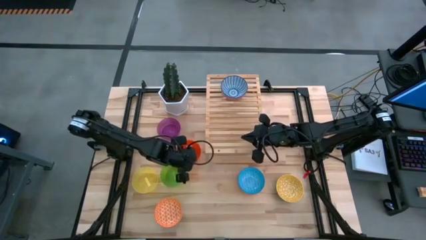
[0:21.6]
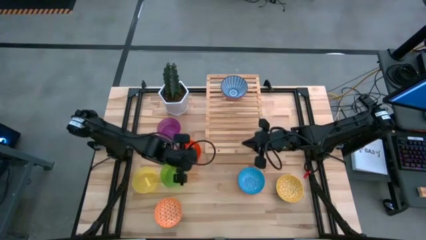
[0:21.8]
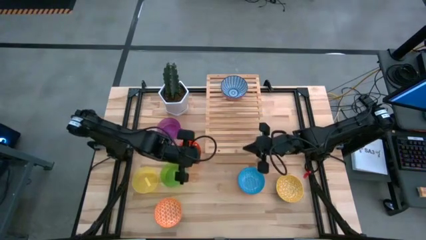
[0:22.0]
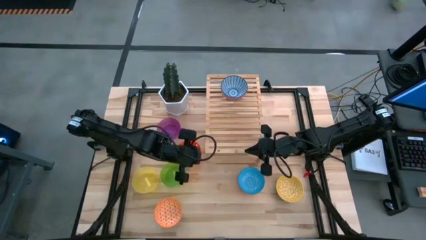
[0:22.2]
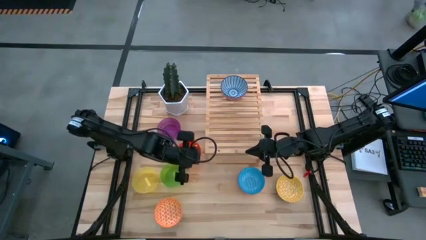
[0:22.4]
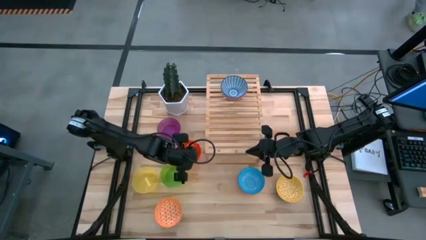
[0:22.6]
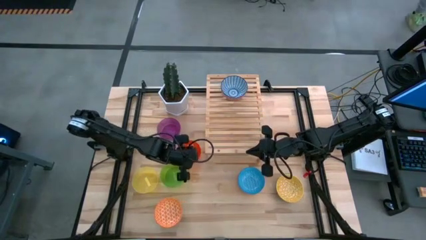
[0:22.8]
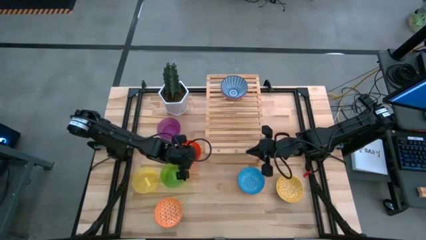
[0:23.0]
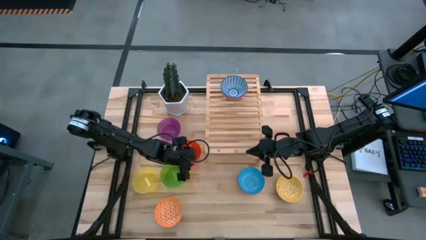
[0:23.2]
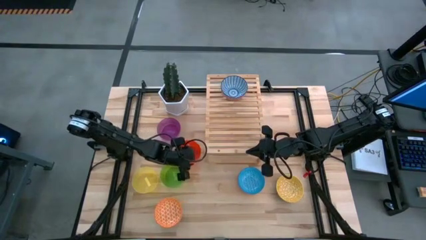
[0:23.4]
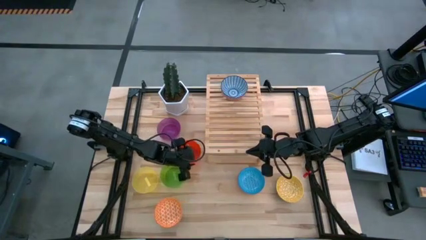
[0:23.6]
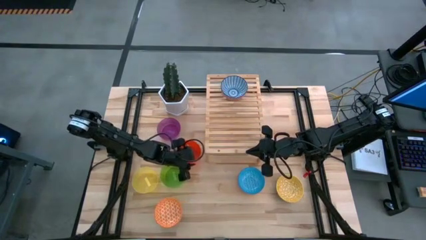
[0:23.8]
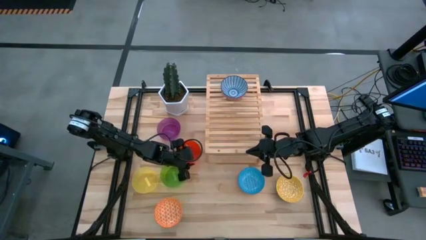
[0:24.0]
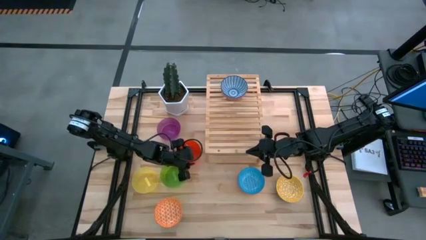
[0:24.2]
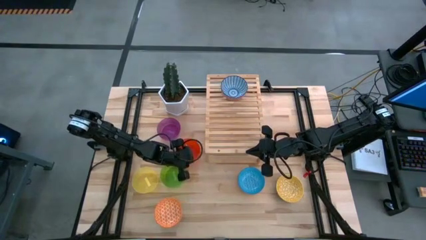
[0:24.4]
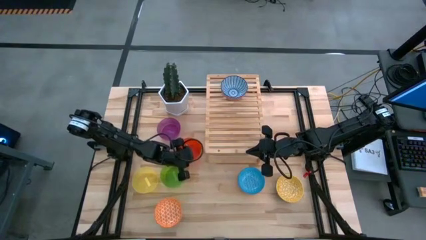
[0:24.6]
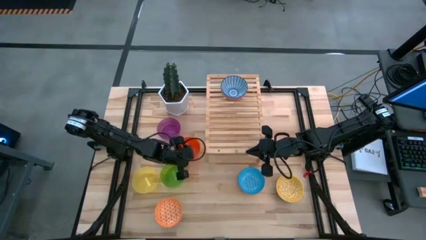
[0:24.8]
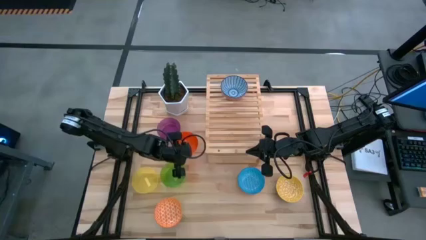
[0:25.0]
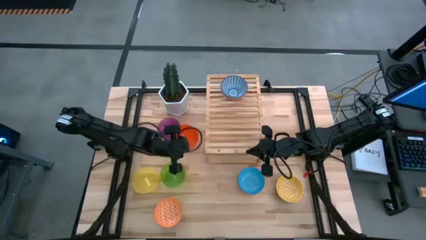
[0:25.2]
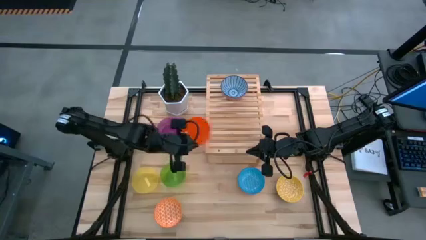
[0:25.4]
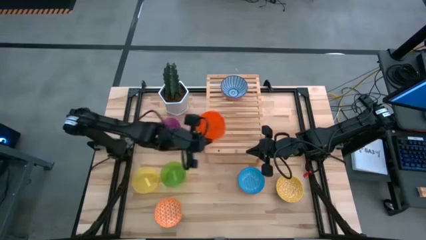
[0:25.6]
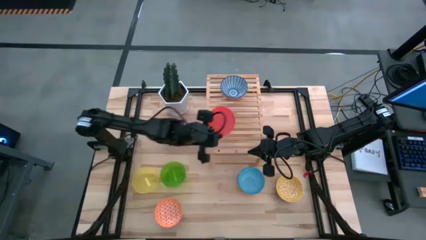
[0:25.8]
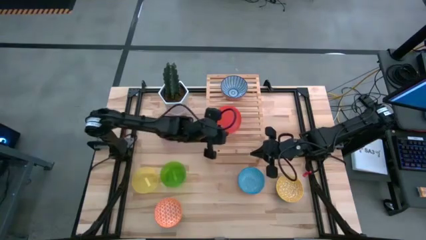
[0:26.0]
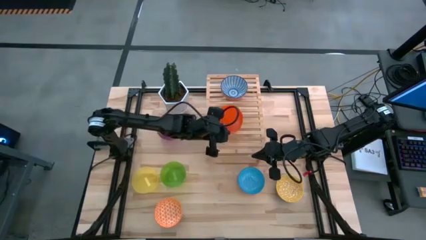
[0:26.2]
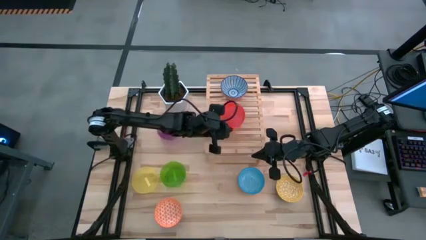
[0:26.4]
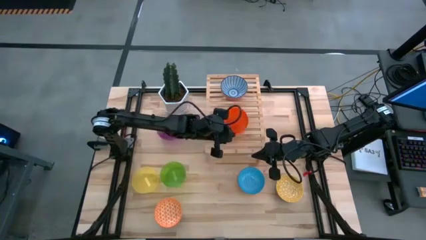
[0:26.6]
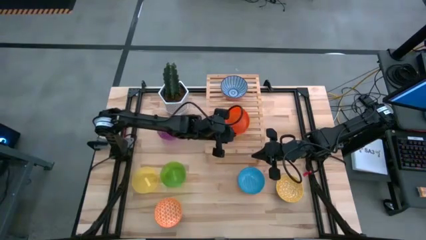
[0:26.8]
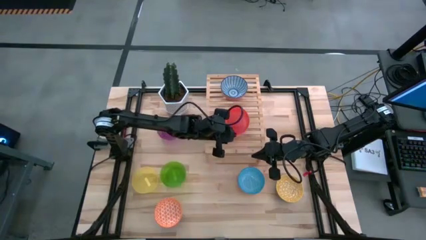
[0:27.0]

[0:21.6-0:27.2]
Task: Place and stack bowls onto a shelf
Put the orange bowl on the shelf

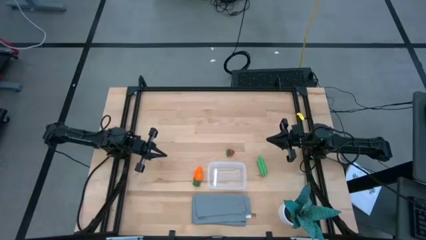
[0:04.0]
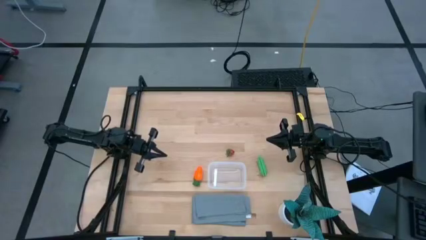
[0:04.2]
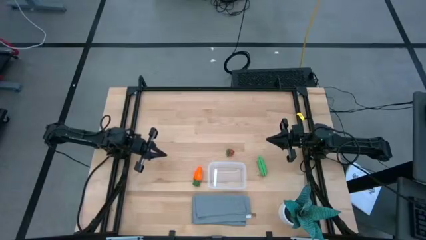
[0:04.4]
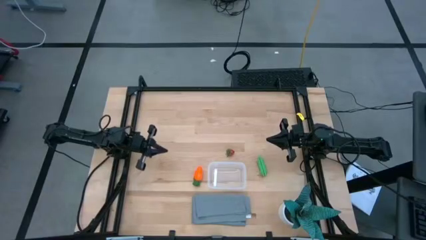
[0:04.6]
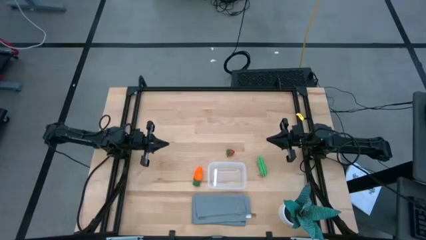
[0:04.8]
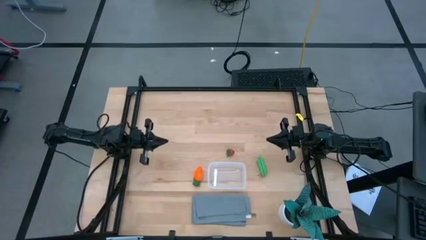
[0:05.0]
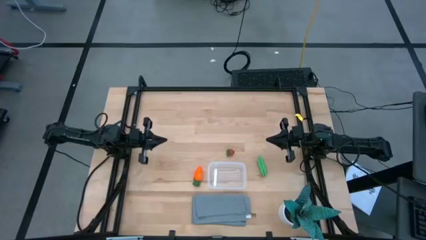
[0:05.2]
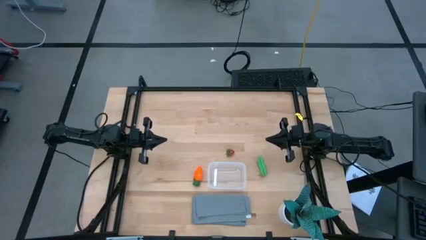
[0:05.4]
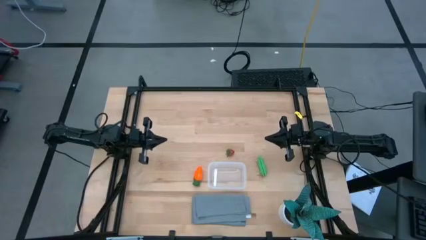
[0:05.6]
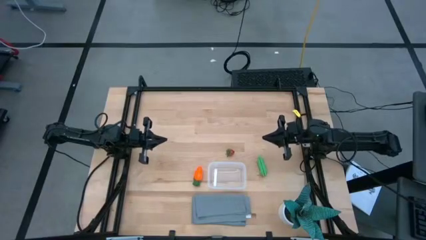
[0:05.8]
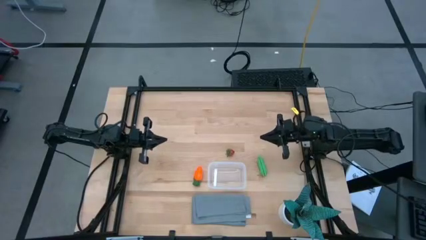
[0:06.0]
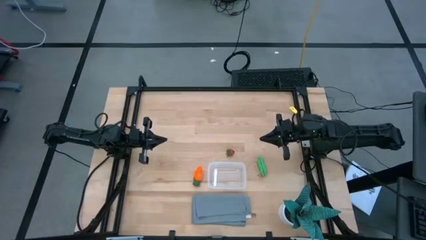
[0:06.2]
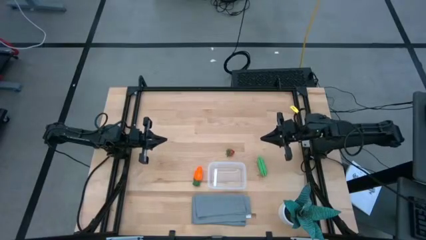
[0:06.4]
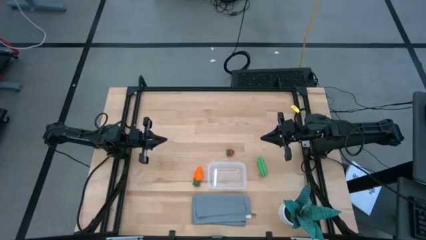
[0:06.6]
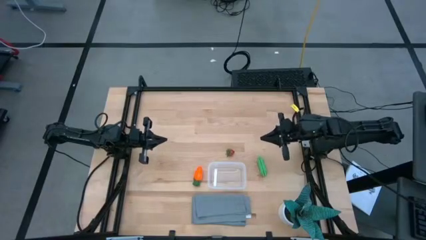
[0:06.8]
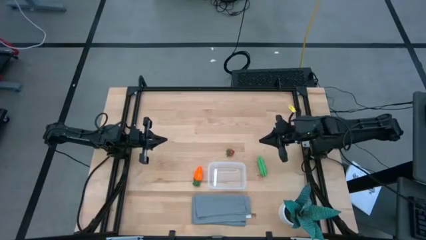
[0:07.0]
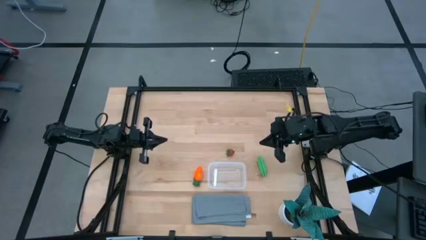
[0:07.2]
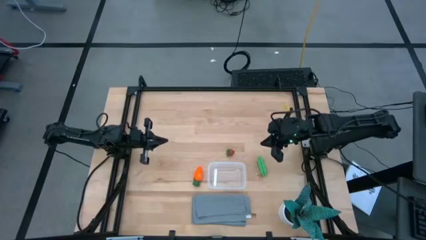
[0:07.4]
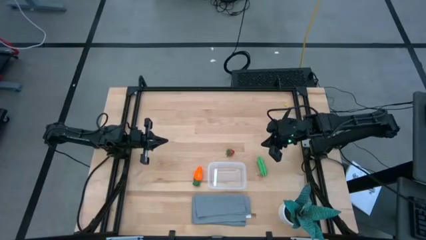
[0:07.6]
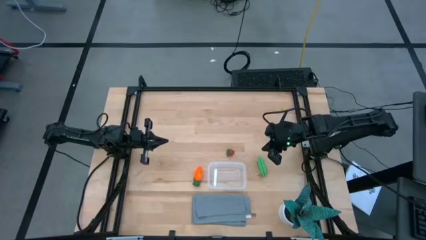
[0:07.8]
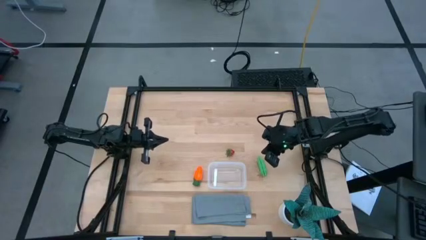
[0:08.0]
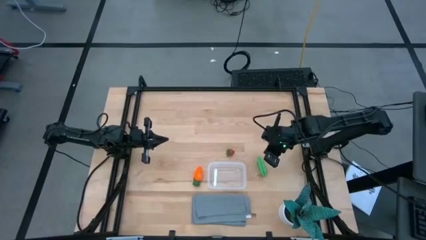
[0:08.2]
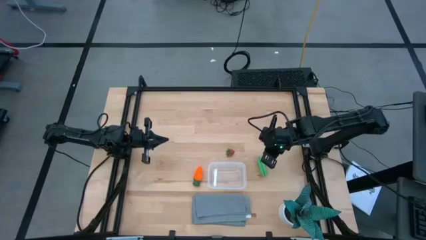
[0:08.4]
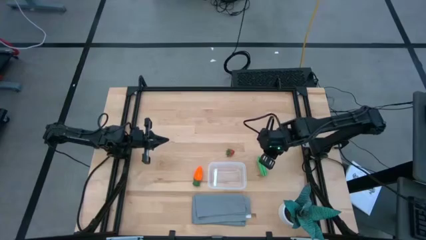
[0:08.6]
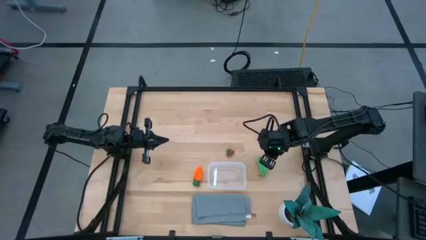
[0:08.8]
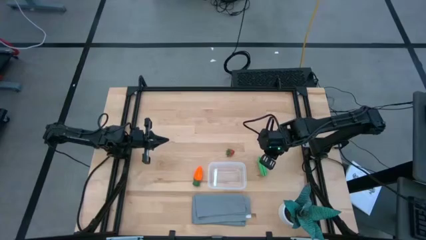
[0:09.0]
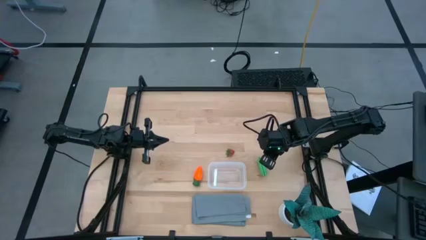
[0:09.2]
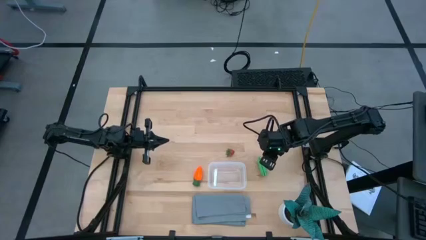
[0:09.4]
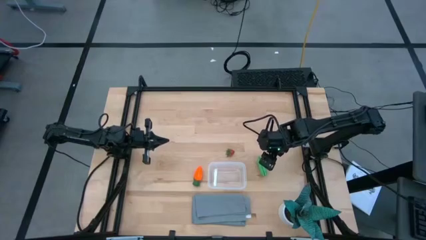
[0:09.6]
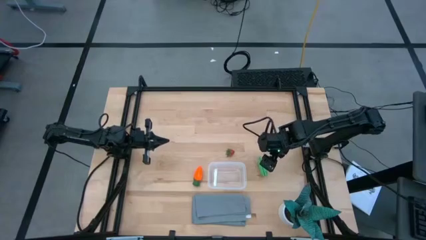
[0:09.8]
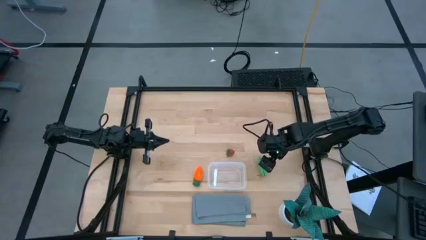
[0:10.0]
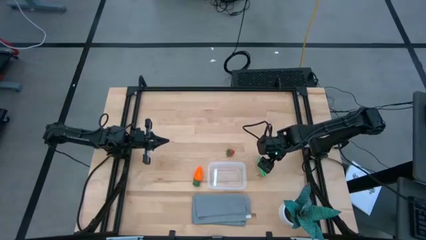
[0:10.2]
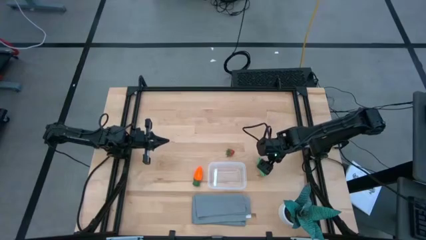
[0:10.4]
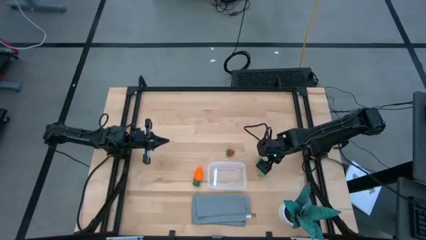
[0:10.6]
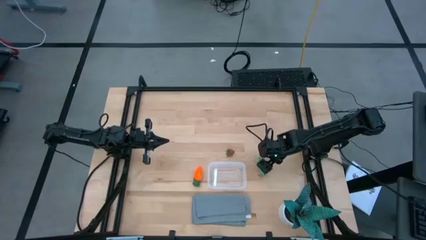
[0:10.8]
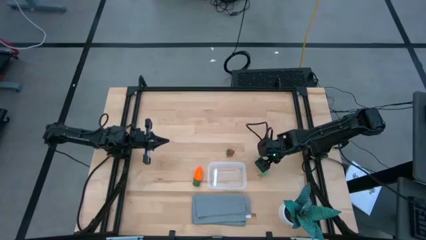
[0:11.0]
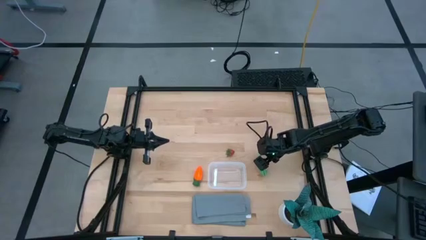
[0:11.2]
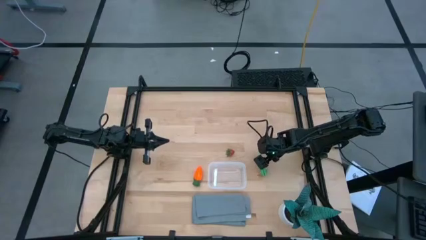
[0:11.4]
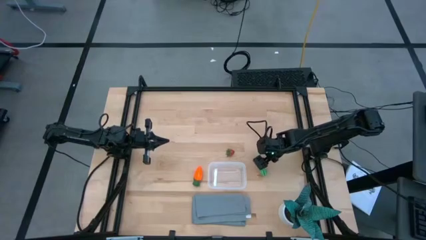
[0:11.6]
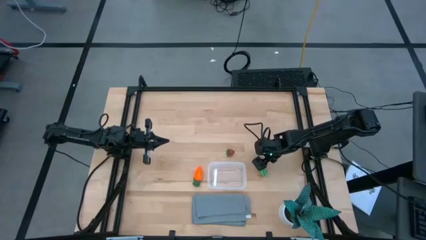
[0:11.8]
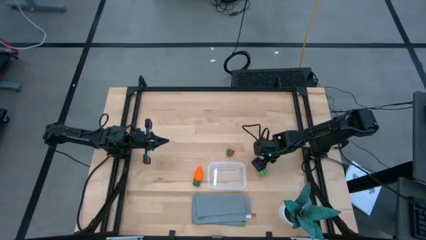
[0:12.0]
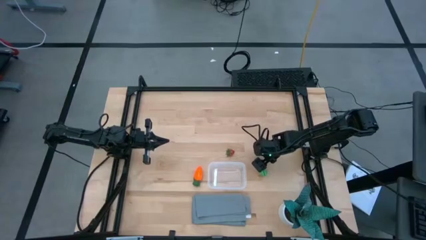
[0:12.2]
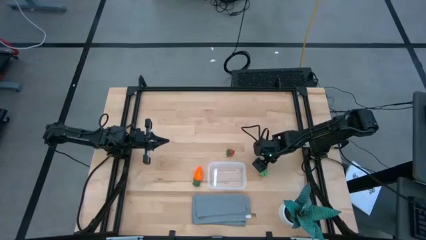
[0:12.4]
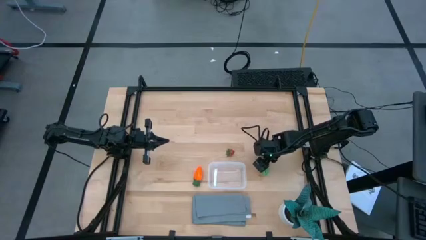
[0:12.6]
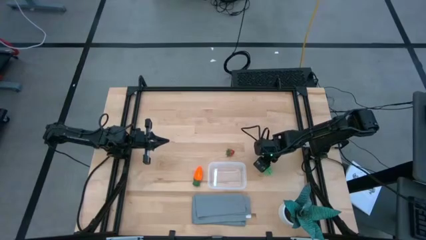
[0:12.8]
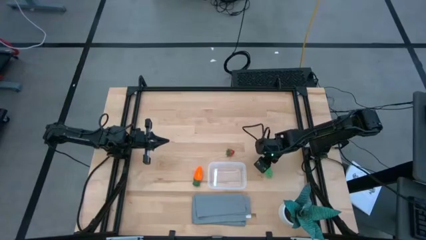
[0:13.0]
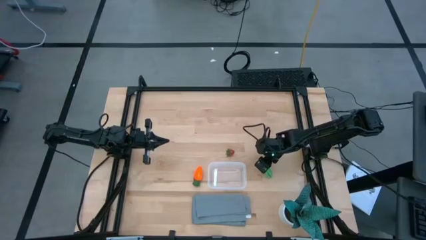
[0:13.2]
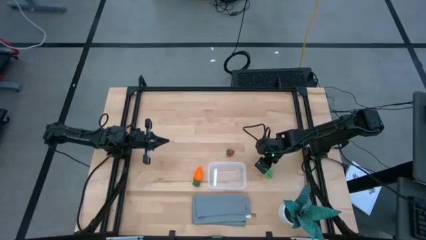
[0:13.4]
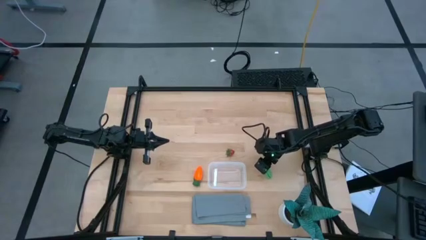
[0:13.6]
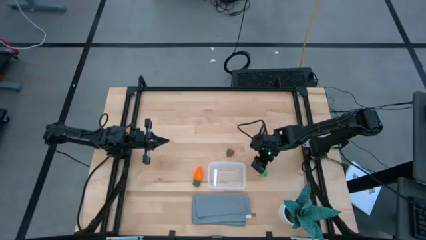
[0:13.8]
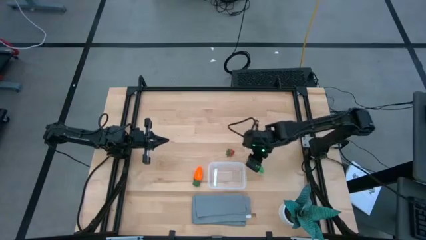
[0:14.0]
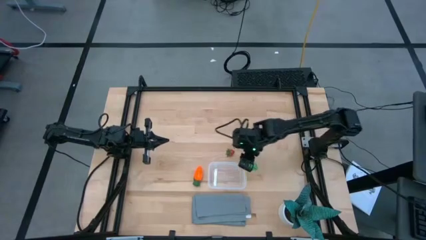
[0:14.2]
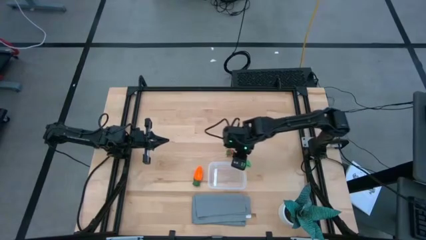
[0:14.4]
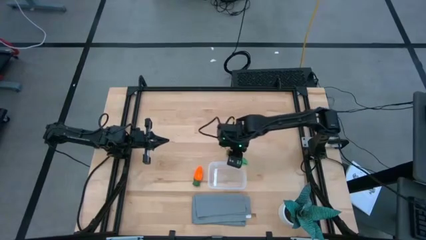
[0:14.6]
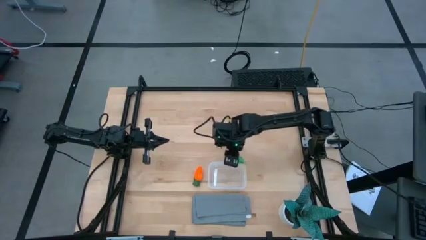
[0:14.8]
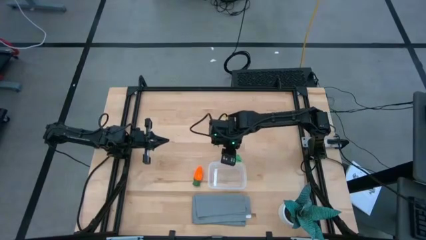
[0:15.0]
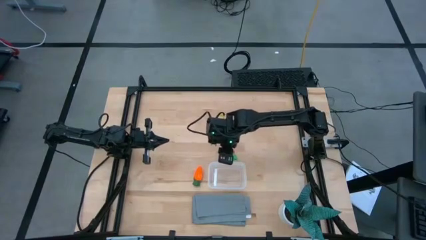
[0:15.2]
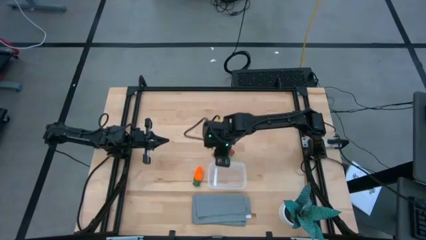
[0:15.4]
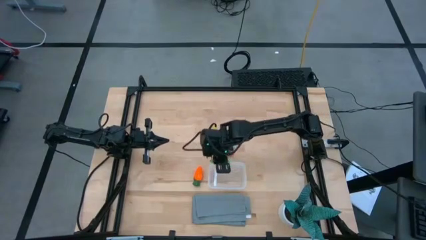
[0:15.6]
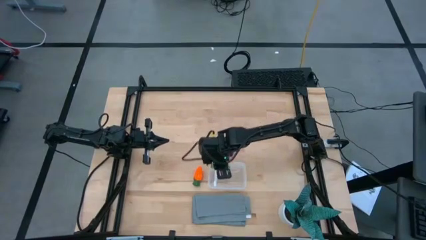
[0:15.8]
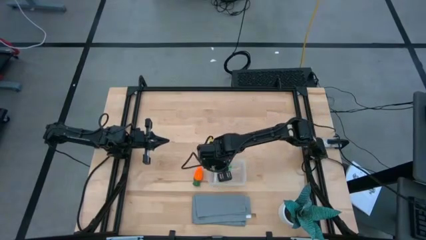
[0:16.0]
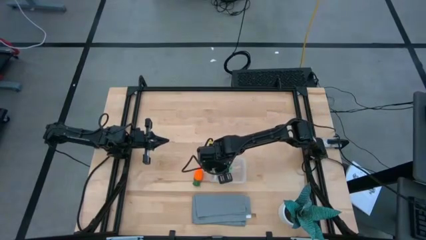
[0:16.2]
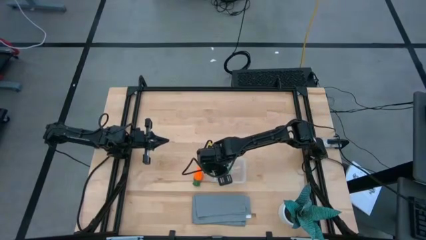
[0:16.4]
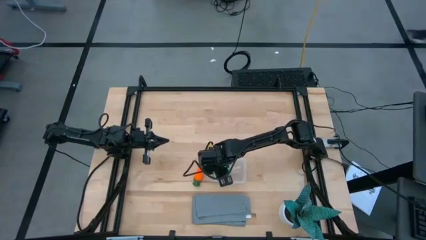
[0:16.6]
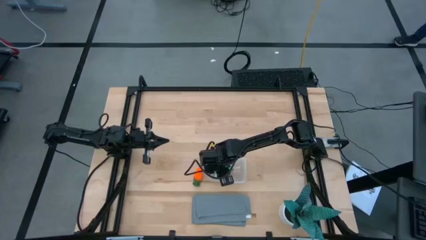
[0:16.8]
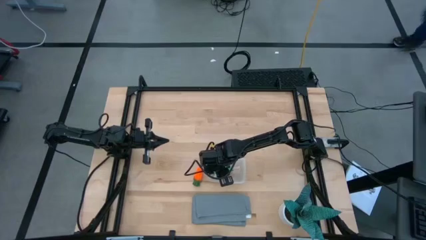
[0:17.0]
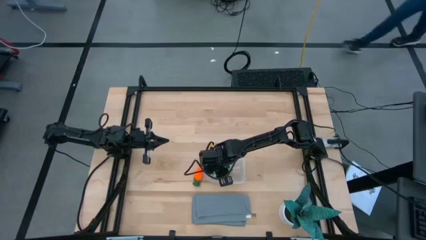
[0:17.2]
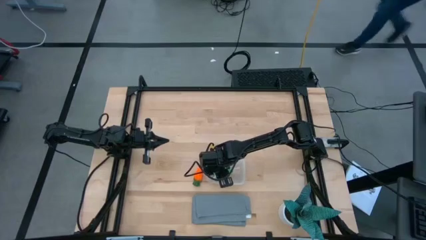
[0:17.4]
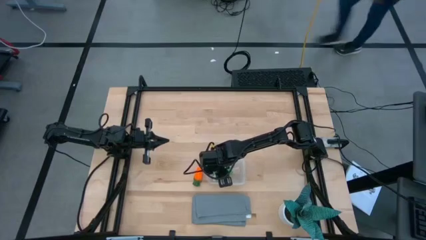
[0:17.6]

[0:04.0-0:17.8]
Task: Pick and placing Produce into tupperware
Put the green peas into the transparent bin
